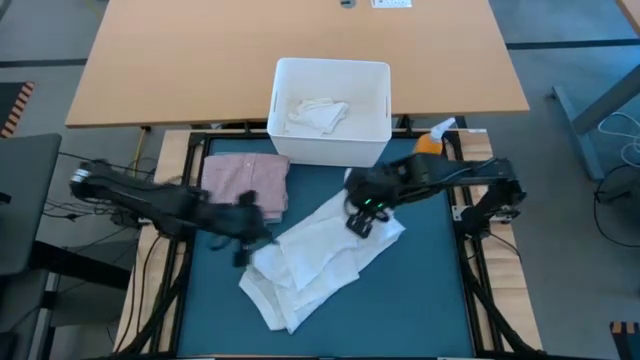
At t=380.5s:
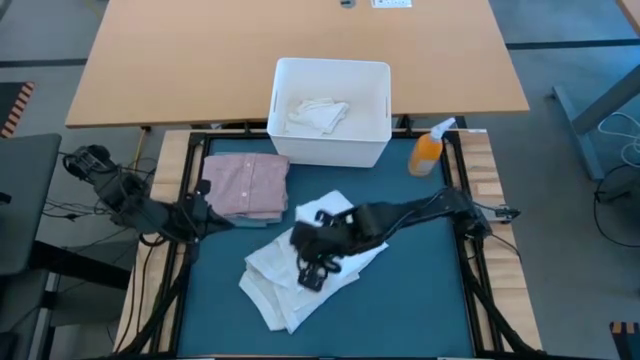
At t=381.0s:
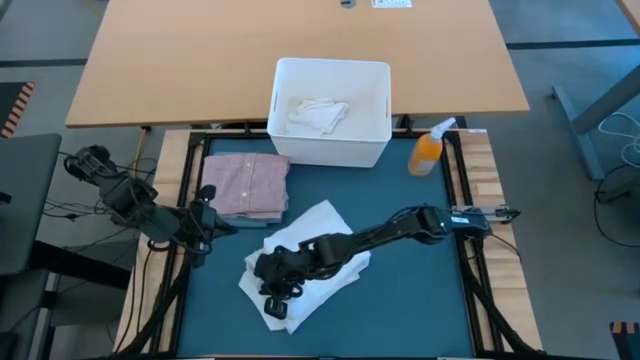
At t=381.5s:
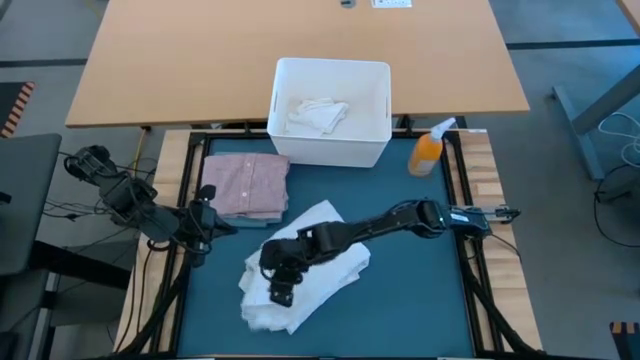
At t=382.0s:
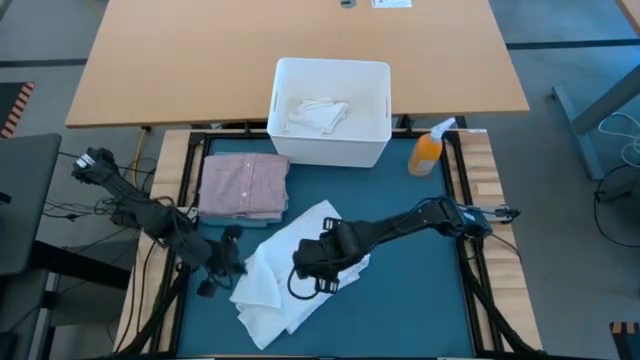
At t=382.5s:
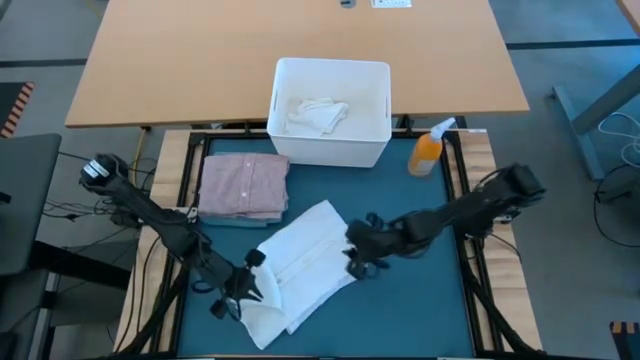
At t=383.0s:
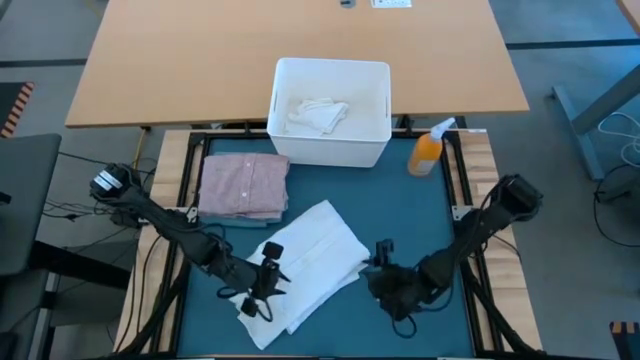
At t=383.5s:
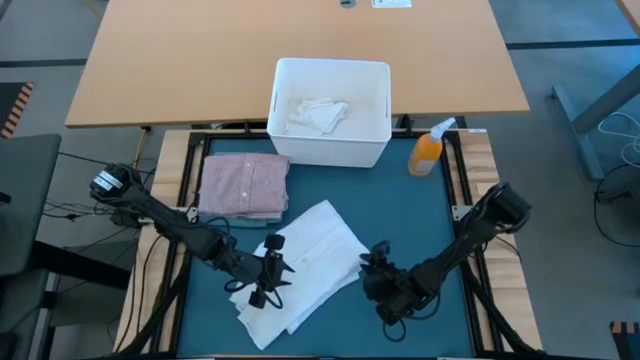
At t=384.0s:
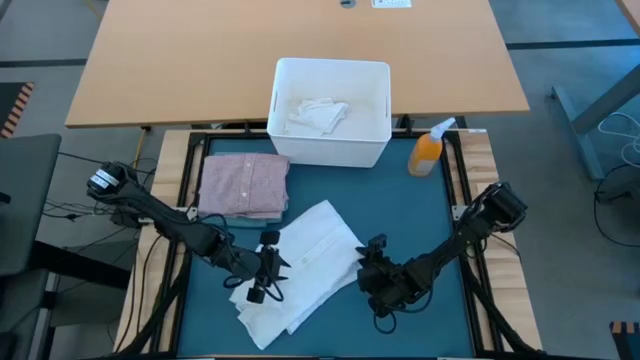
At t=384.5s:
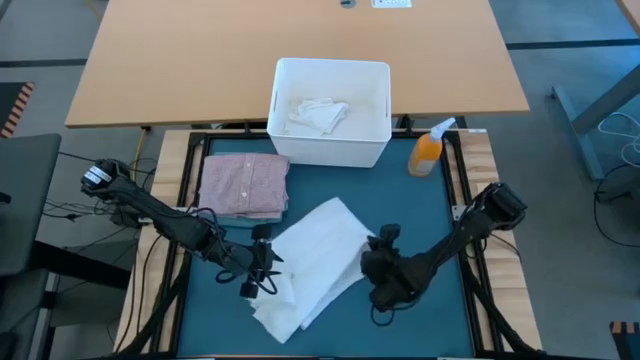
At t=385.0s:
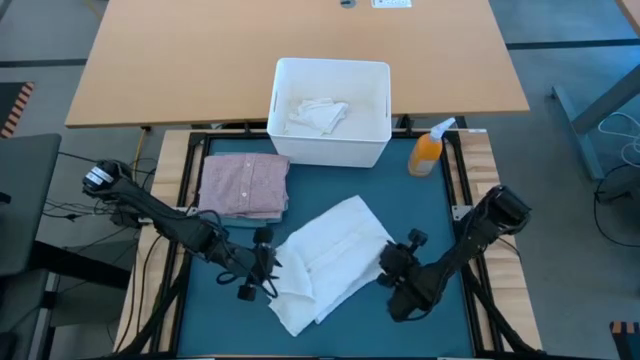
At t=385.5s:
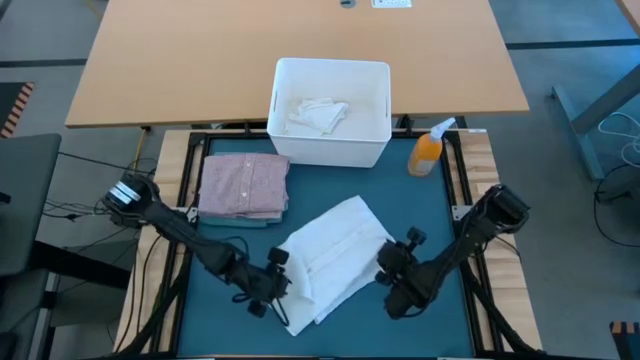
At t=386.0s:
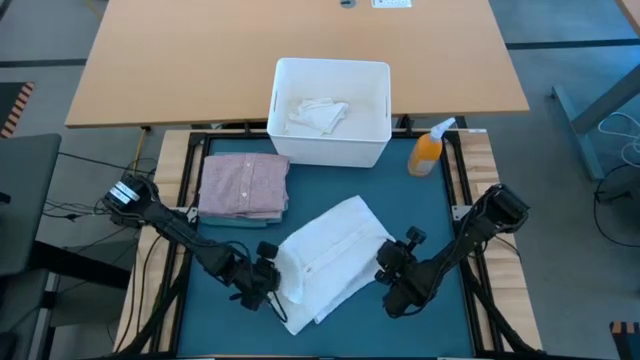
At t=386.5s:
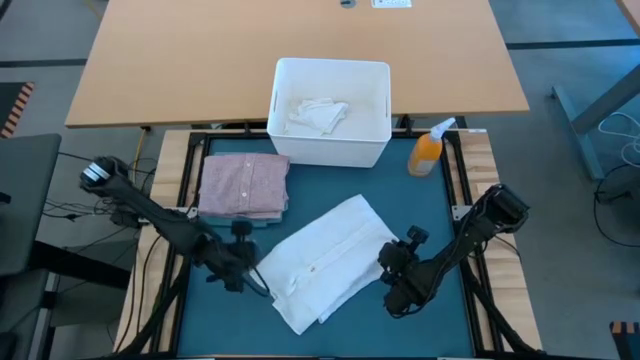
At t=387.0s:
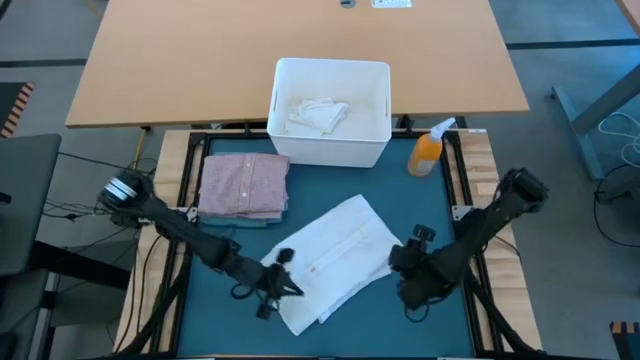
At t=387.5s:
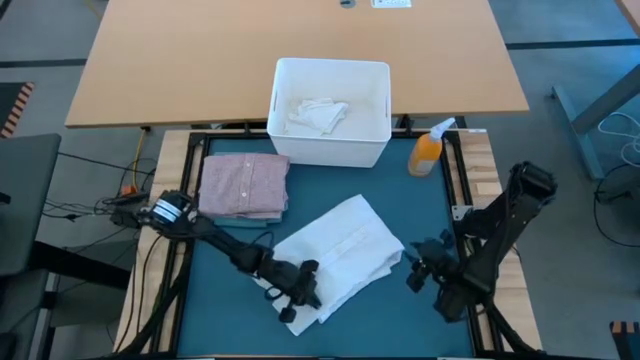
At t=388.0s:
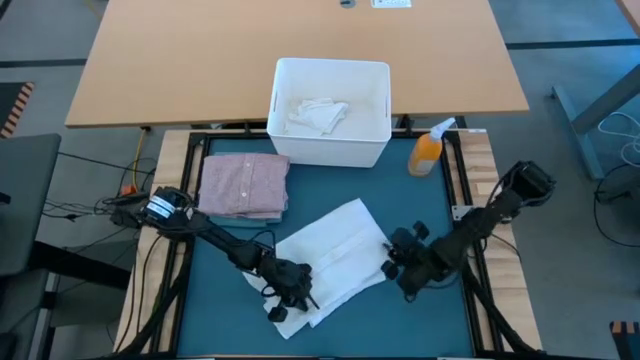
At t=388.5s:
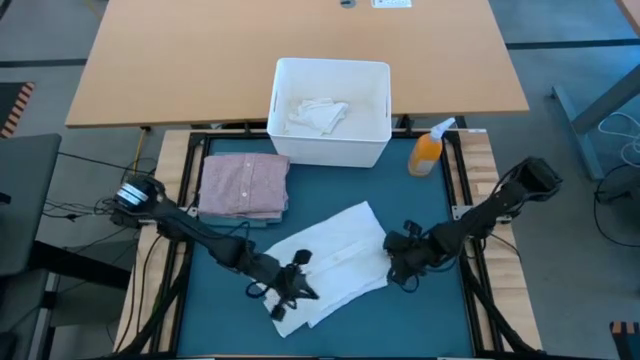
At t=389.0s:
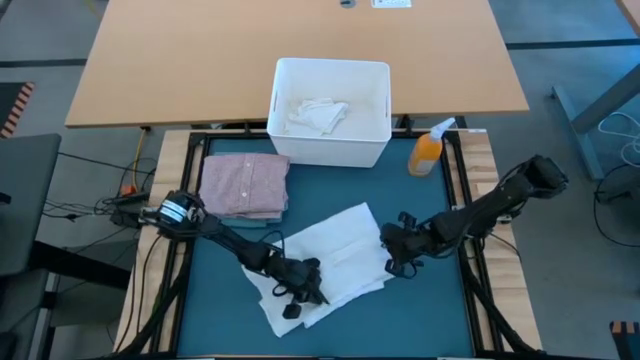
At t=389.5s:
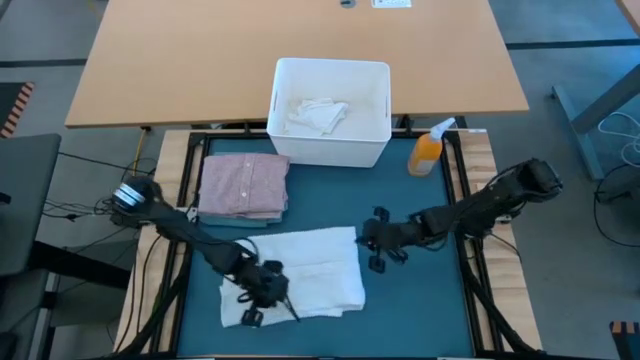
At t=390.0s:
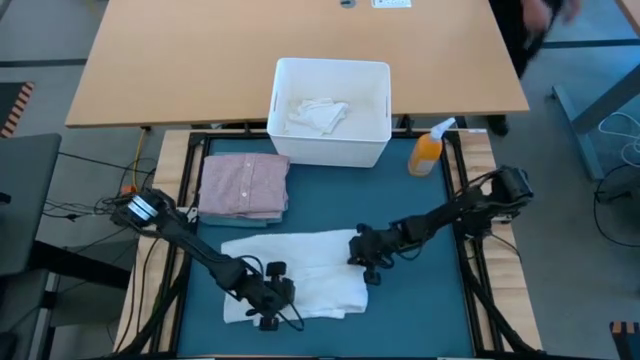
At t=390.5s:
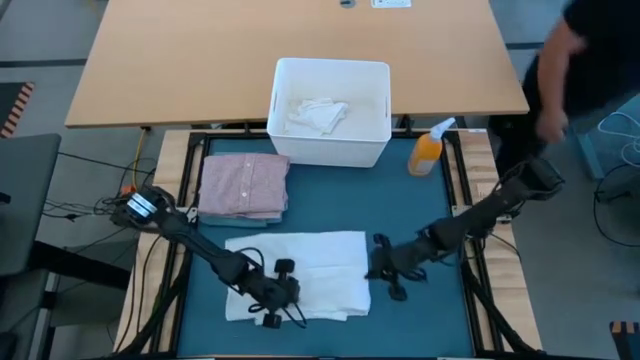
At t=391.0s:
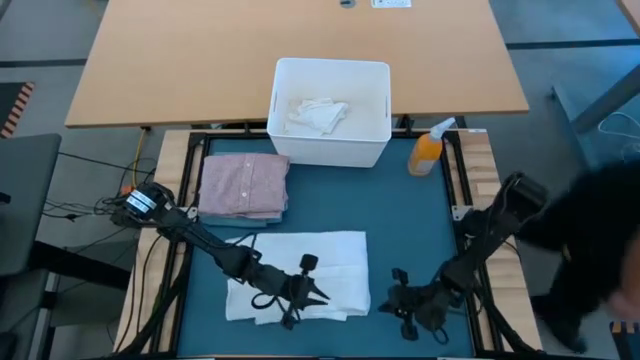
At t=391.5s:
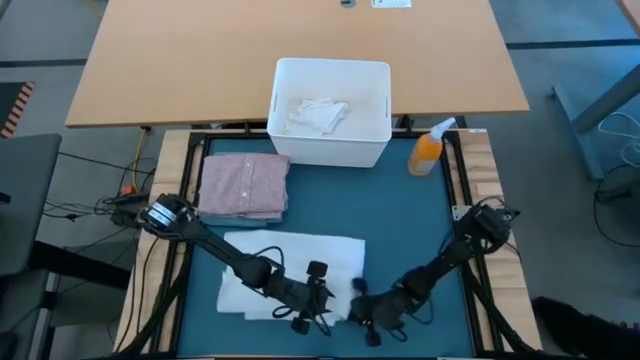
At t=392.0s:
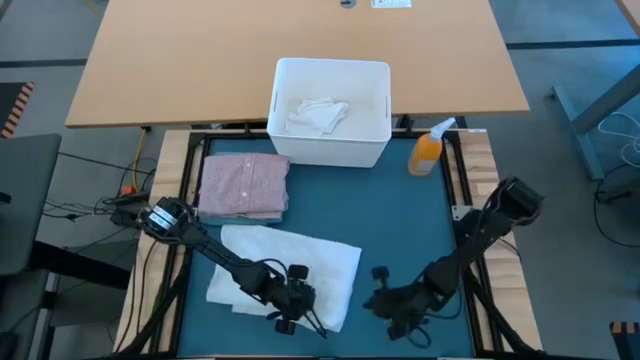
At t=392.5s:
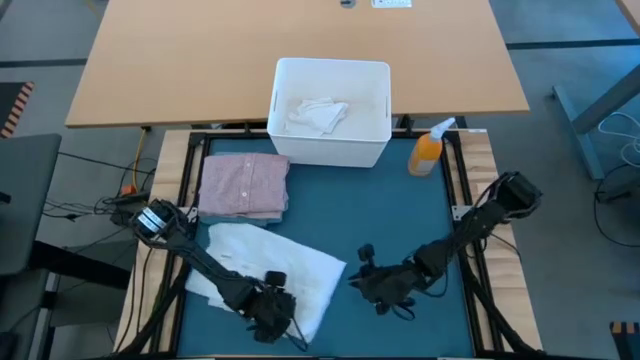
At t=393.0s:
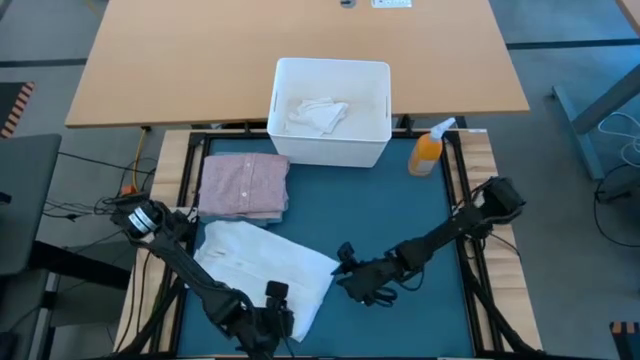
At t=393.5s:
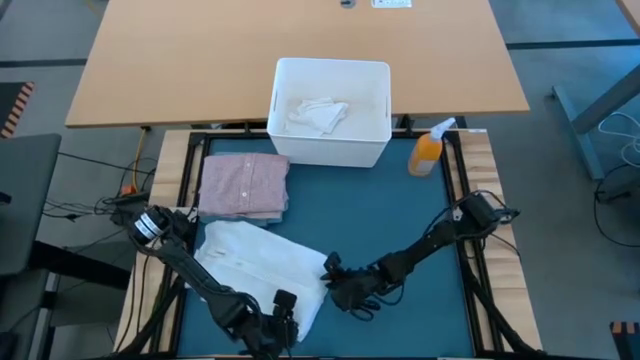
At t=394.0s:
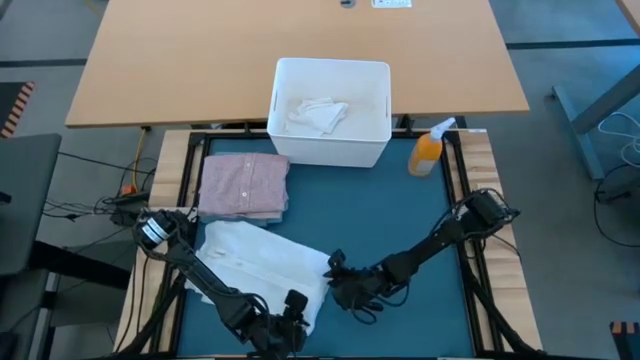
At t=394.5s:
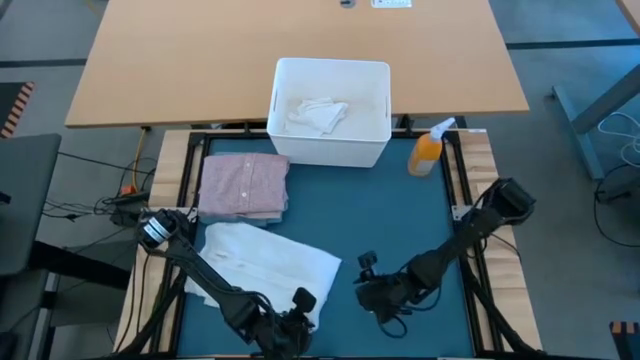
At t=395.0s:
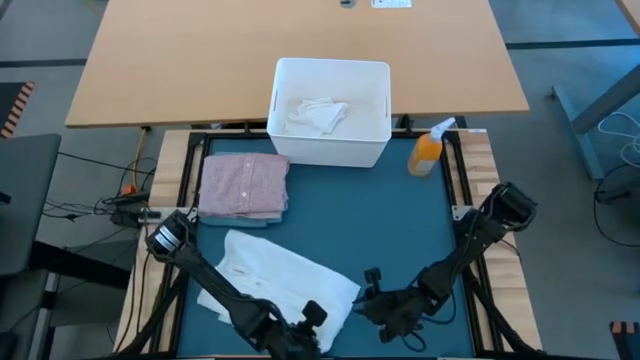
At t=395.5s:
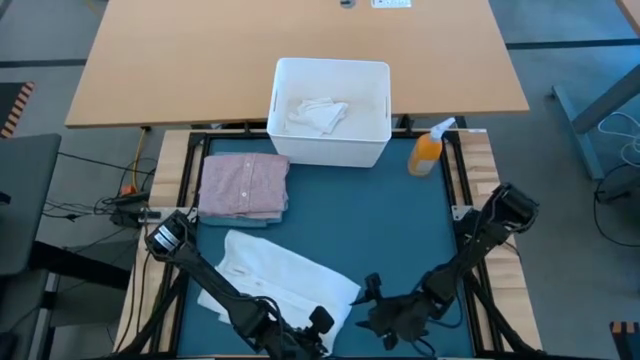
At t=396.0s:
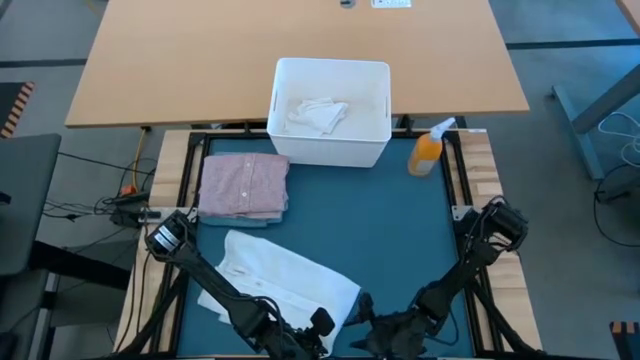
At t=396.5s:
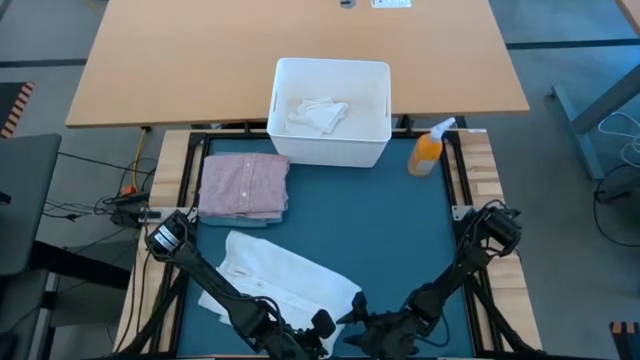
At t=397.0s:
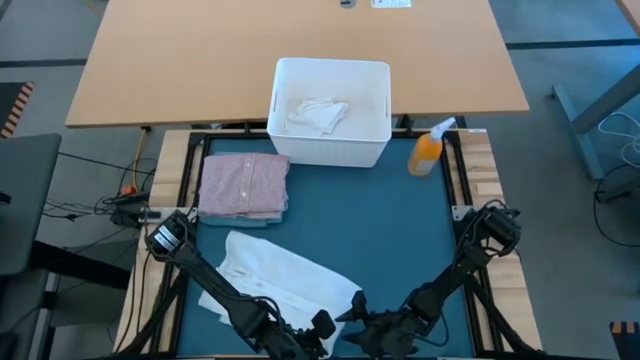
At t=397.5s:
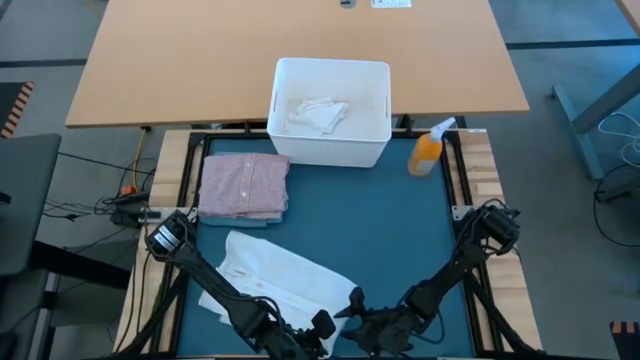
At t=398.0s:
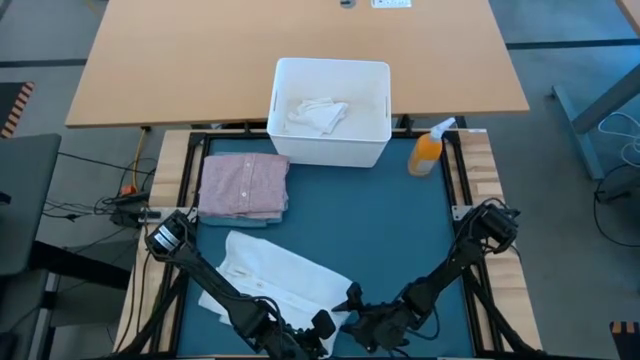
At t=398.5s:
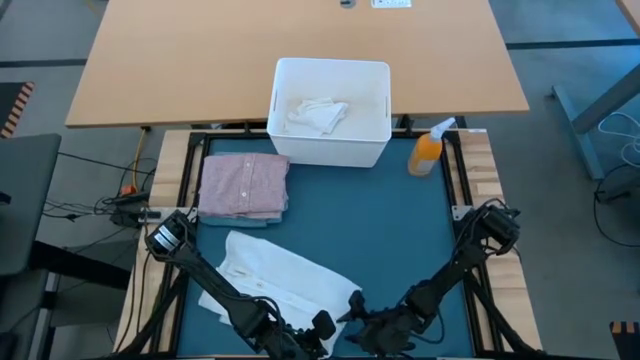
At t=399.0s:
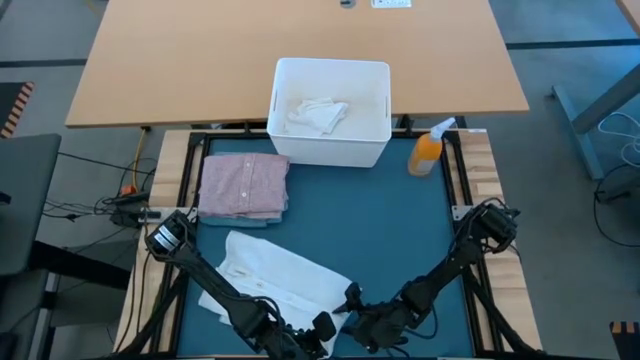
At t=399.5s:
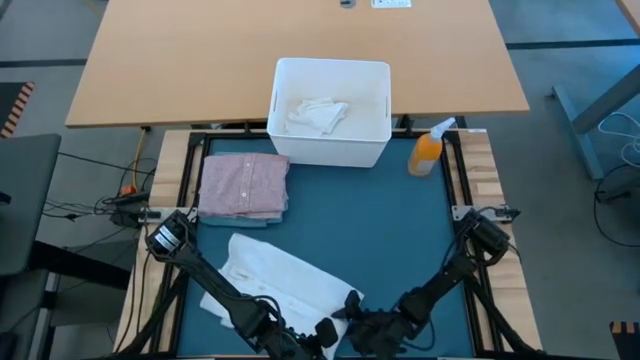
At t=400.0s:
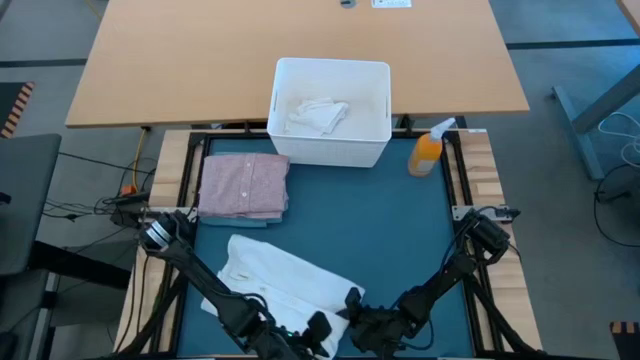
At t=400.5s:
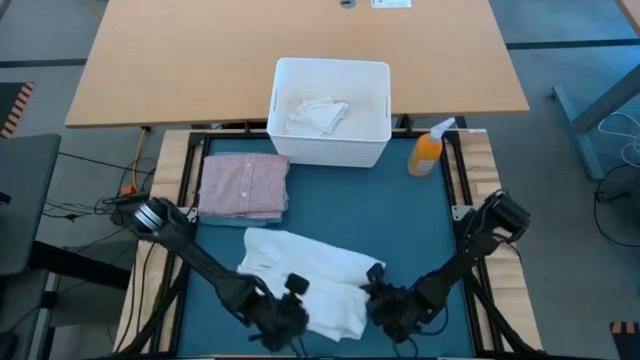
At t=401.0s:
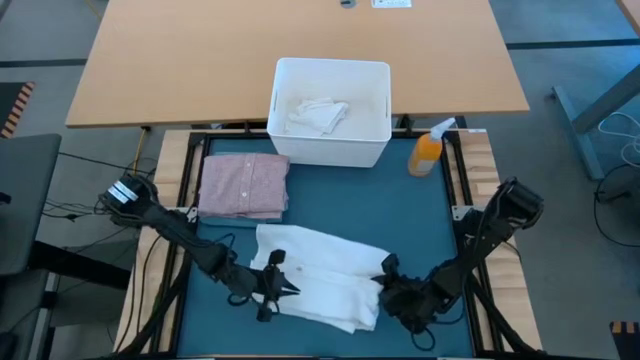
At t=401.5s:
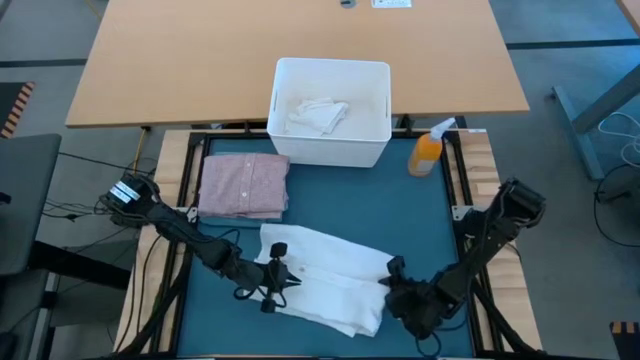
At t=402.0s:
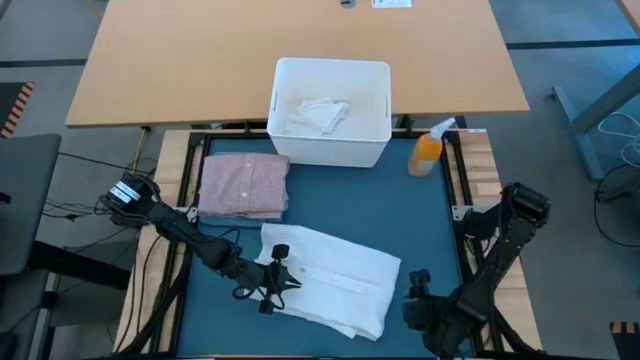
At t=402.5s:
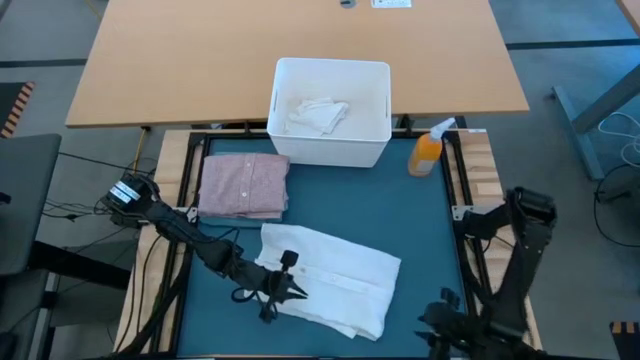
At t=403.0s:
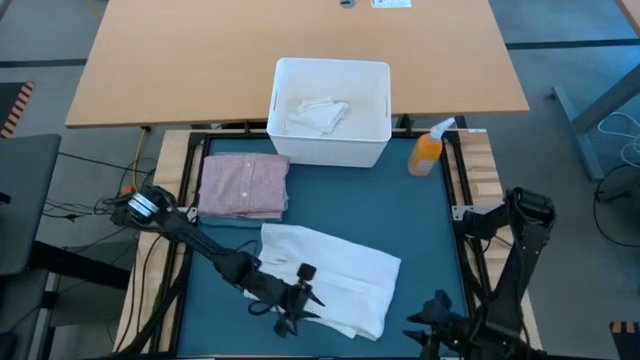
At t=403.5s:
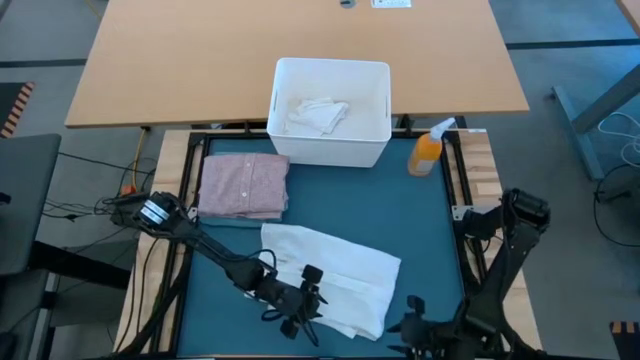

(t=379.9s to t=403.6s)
Task: Fold Laundry from Bin
Fold the white shirt
